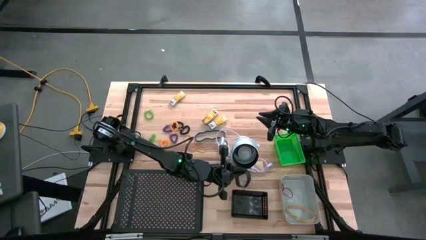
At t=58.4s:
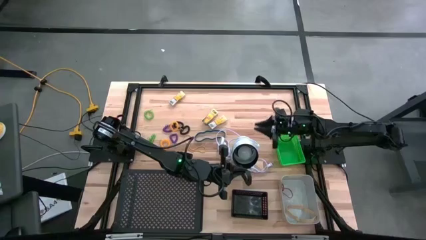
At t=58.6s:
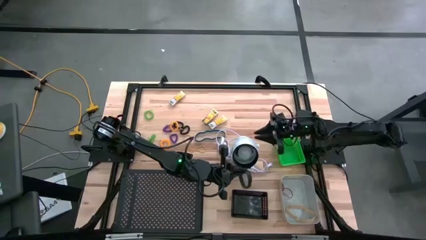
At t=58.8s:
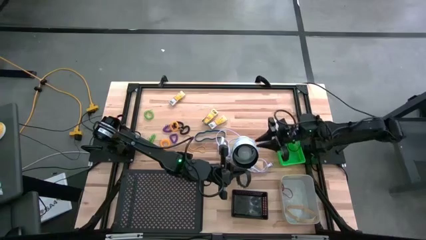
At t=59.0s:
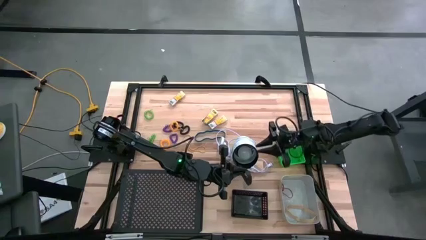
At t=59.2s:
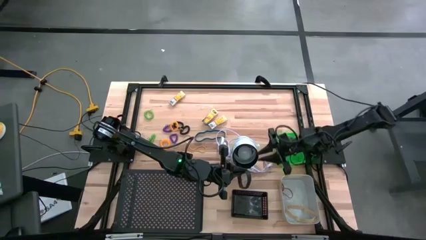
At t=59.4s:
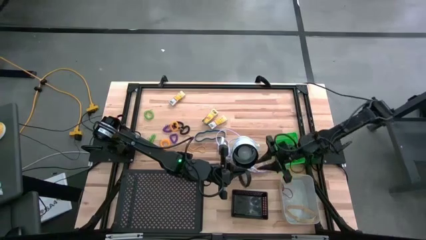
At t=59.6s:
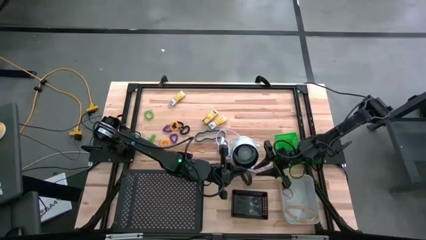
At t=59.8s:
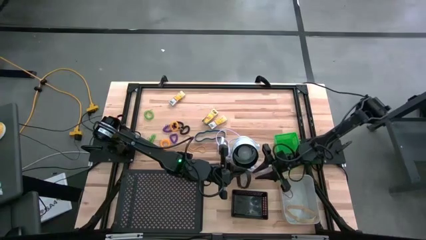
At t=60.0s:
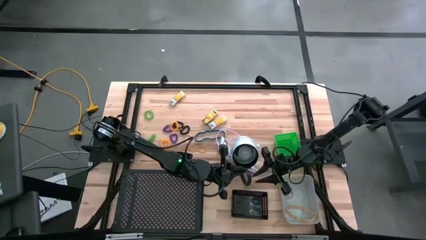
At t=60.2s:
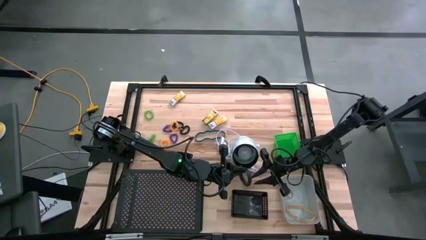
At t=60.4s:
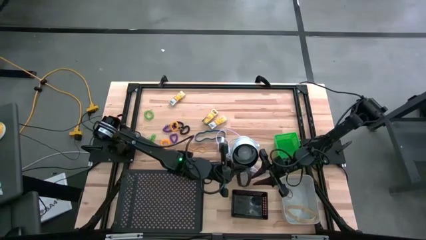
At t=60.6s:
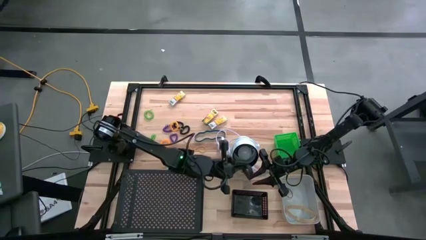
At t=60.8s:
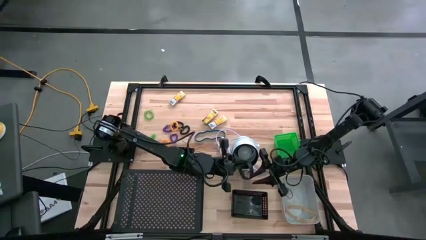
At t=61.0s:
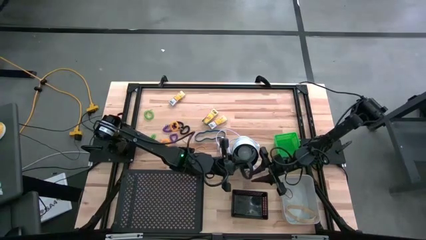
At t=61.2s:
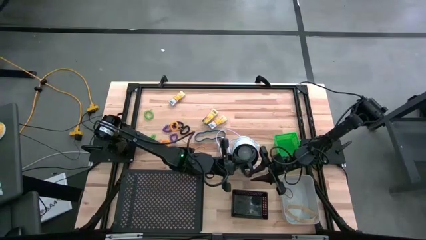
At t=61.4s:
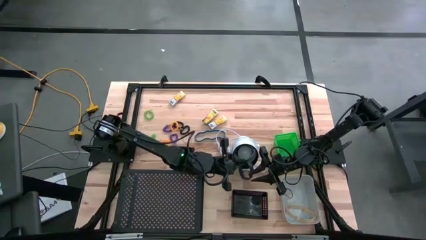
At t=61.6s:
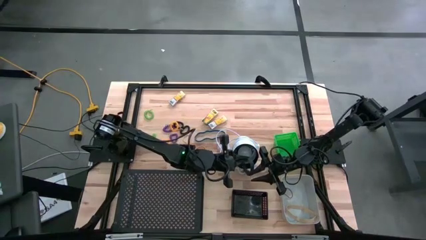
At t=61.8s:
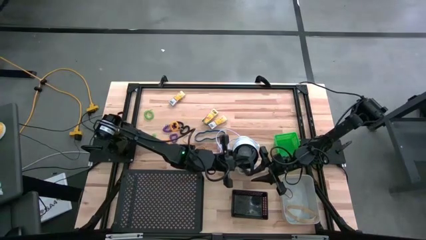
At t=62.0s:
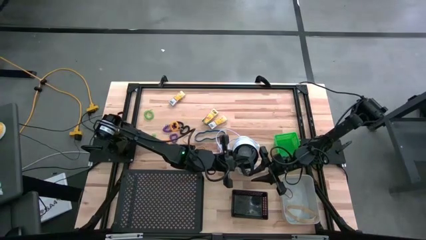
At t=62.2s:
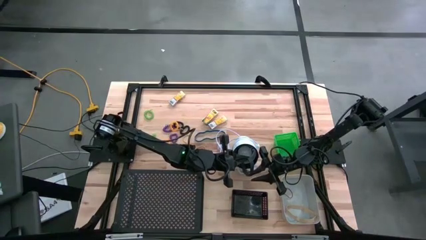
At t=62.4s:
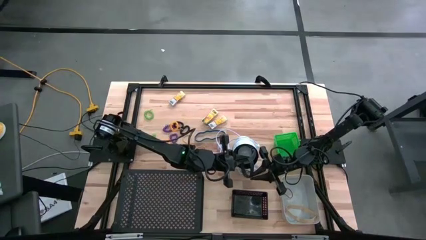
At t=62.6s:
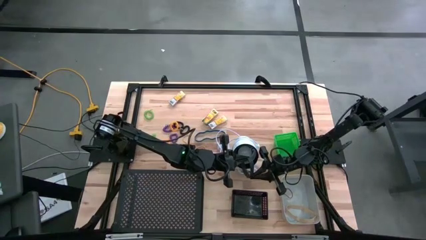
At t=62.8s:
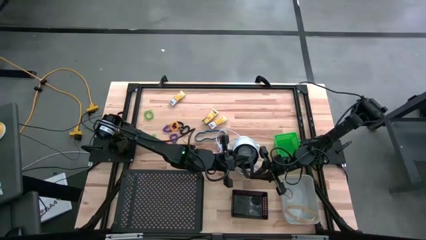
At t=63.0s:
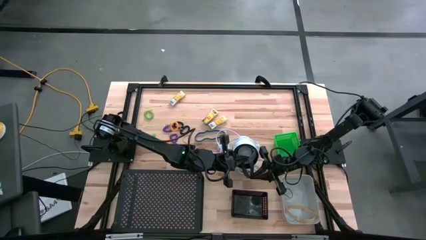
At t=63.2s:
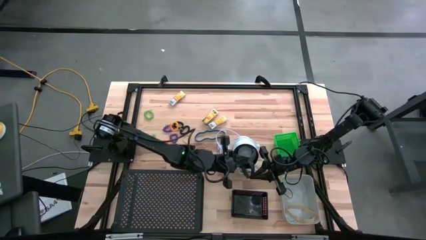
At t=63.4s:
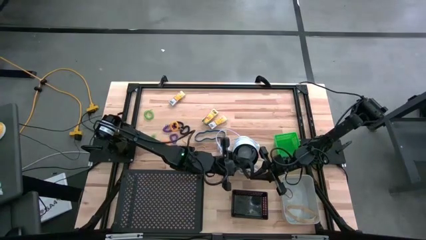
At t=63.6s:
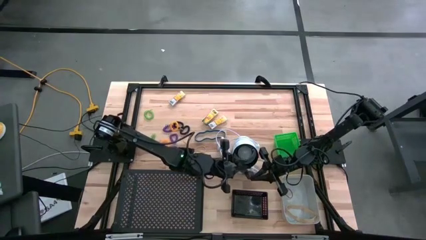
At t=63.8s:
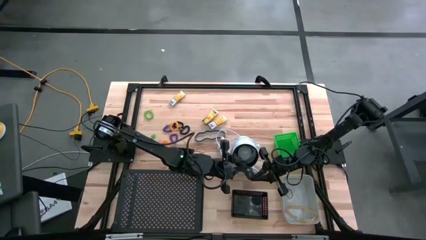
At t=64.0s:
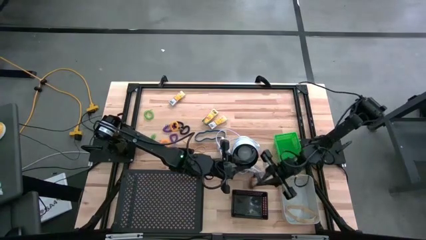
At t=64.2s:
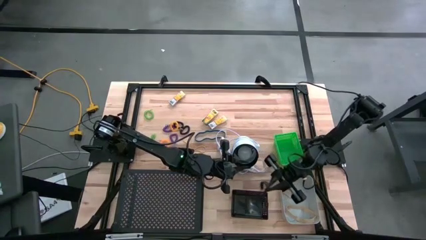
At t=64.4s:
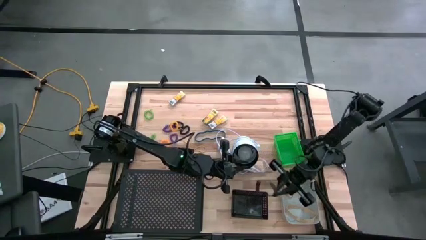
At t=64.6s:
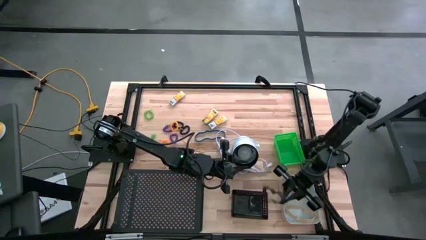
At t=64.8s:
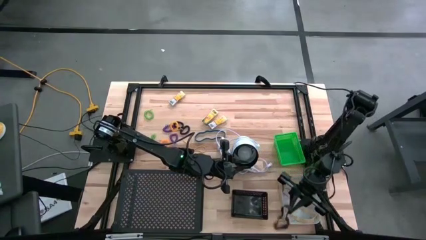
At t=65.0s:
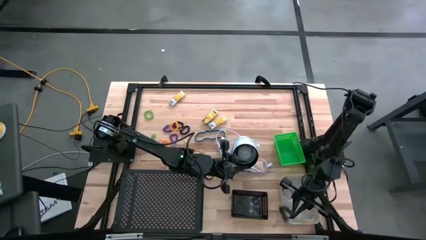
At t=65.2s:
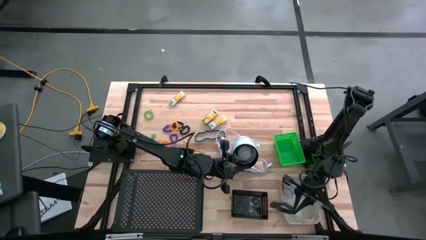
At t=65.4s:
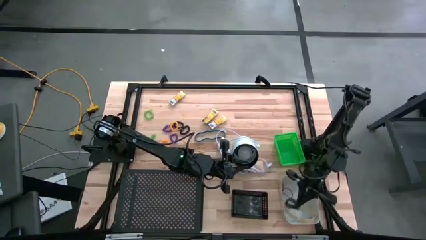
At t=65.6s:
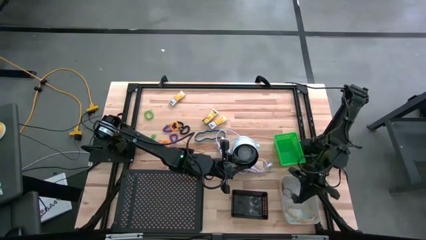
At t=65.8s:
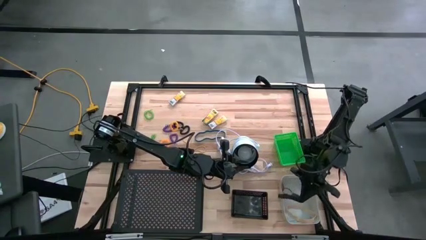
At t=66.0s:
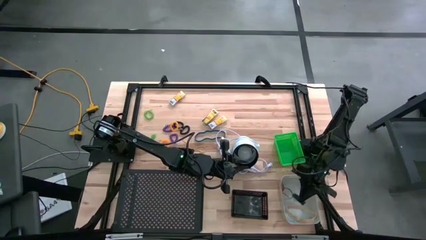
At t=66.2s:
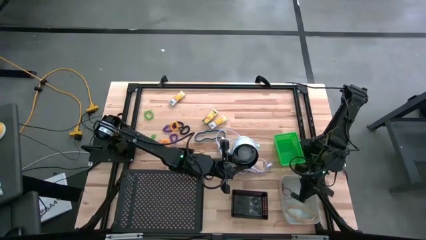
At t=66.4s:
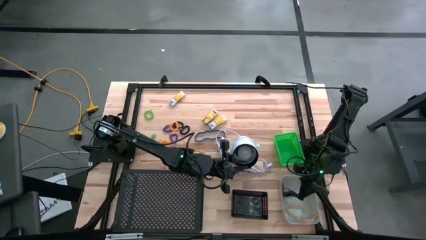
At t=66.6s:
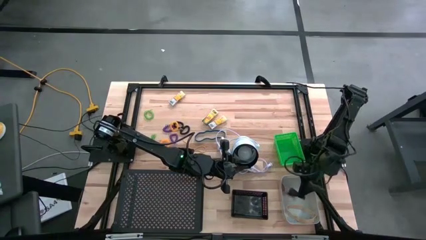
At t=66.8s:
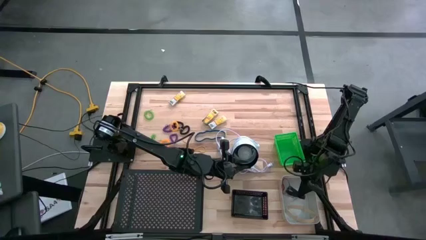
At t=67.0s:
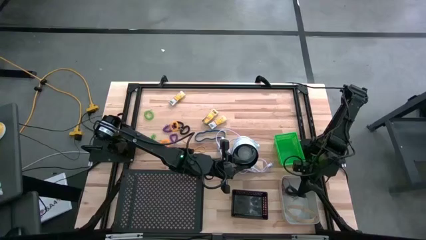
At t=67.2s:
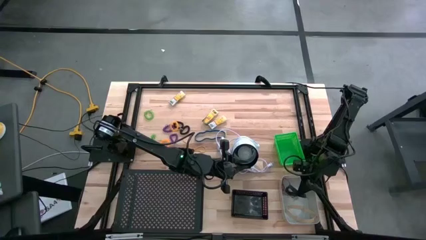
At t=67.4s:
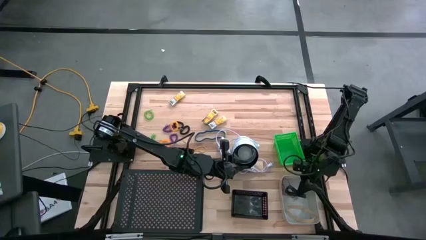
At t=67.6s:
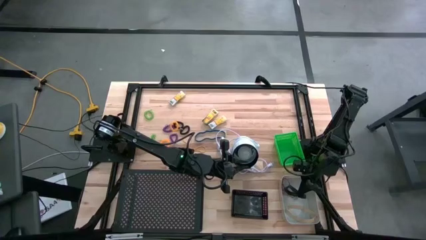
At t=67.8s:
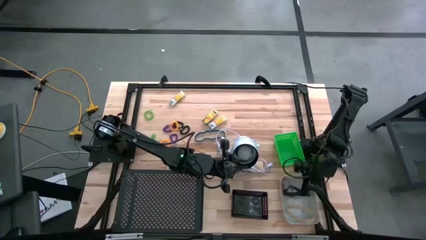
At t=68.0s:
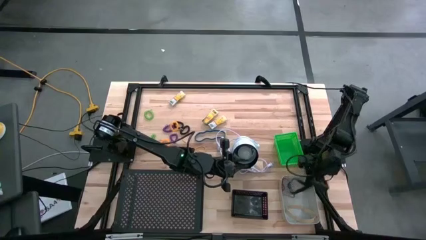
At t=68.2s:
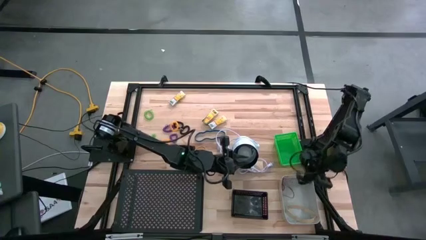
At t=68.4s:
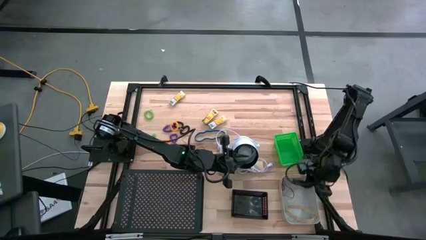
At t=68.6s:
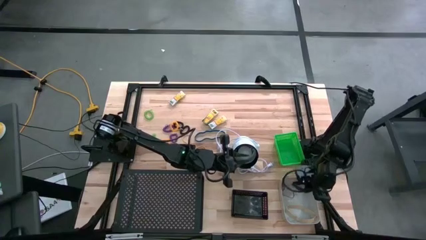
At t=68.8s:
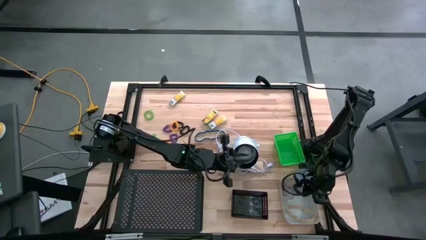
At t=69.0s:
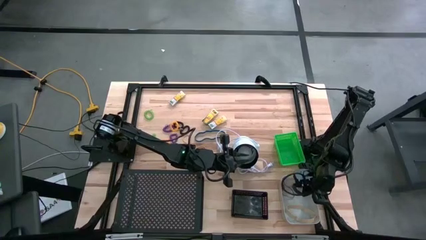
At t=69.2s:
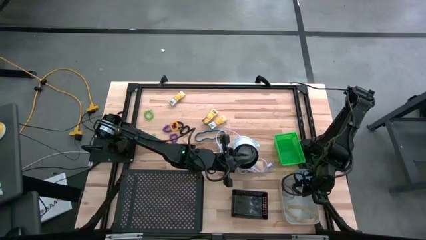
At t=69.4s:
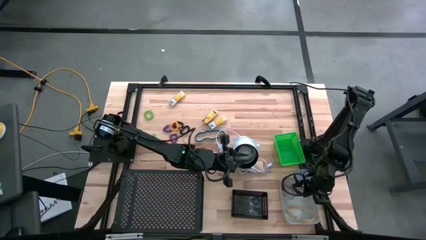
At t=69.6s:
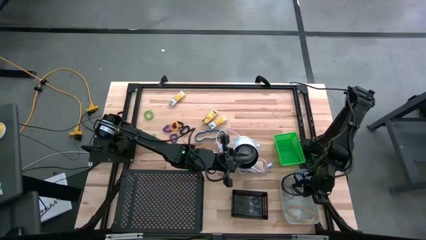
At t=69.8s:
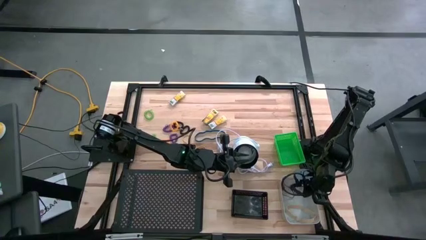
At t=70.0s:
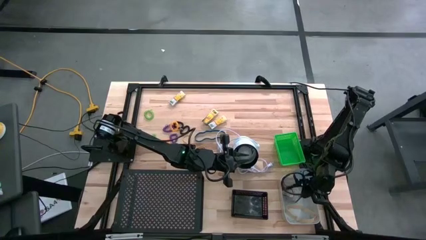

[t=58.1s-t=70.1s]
Task: Pick & Place Office Desk Supplies
Put the black rubberband into the gray bin

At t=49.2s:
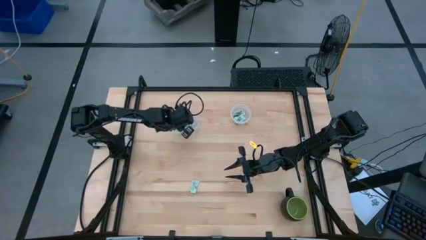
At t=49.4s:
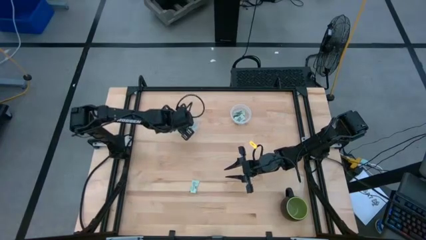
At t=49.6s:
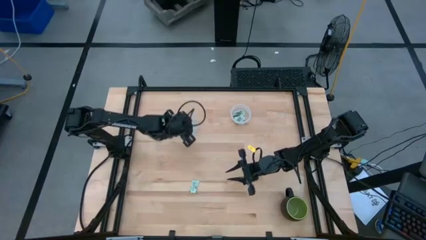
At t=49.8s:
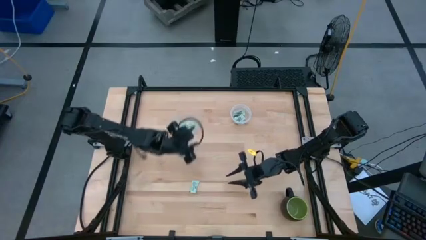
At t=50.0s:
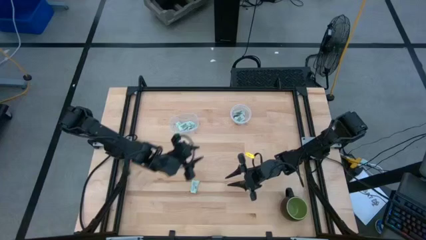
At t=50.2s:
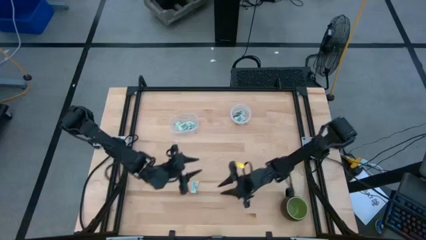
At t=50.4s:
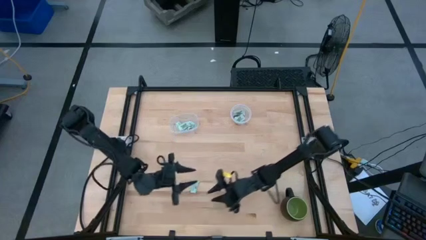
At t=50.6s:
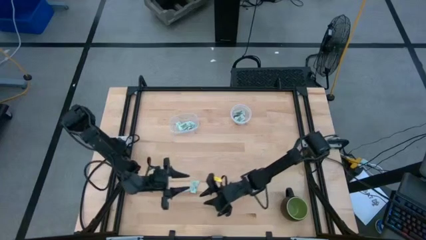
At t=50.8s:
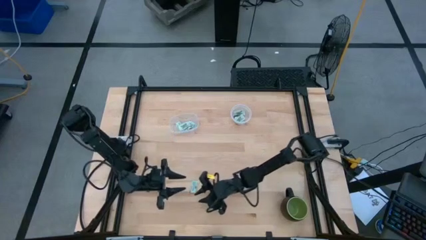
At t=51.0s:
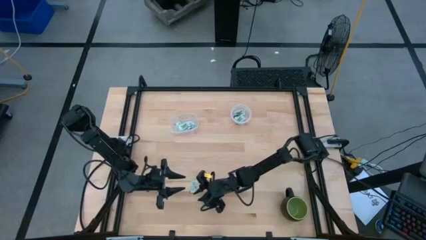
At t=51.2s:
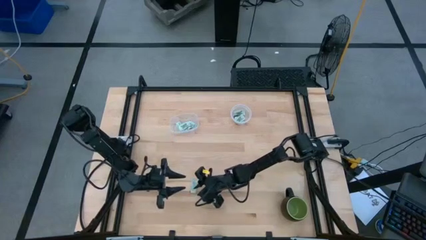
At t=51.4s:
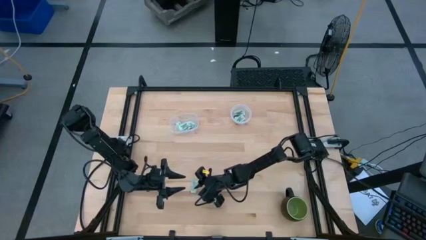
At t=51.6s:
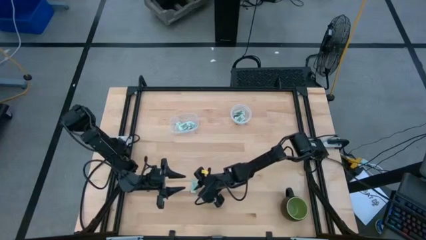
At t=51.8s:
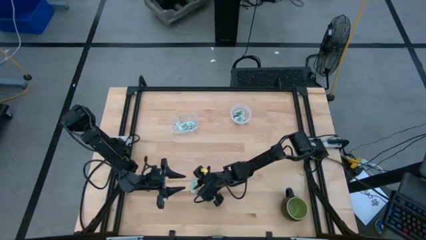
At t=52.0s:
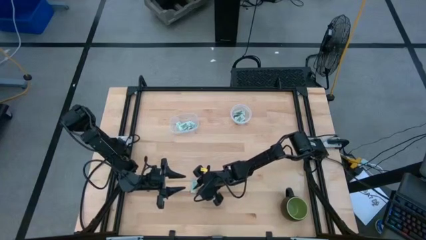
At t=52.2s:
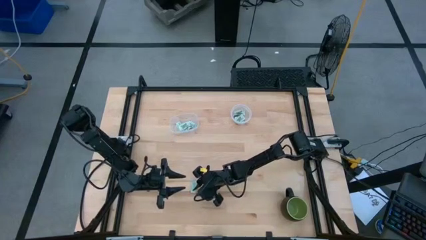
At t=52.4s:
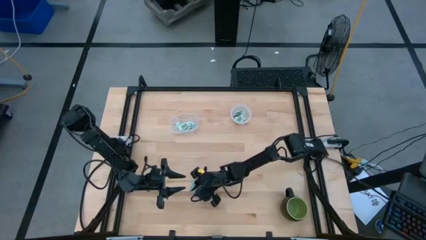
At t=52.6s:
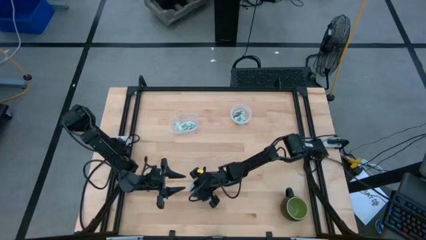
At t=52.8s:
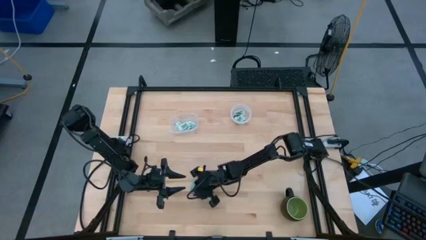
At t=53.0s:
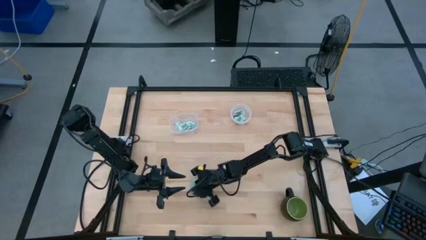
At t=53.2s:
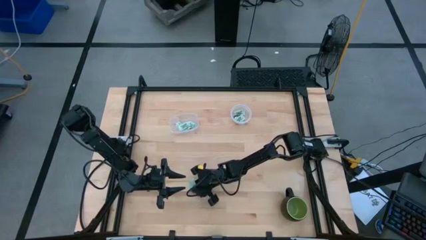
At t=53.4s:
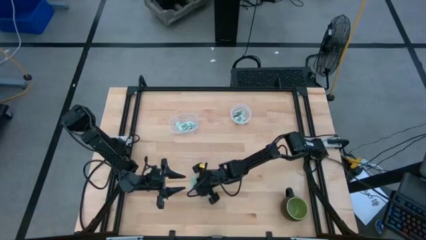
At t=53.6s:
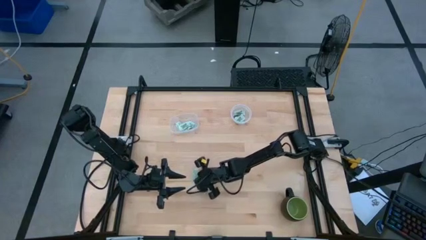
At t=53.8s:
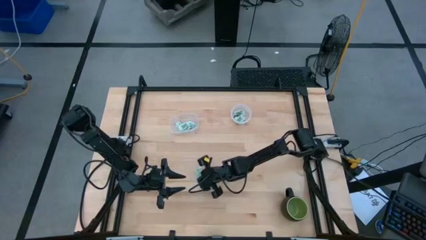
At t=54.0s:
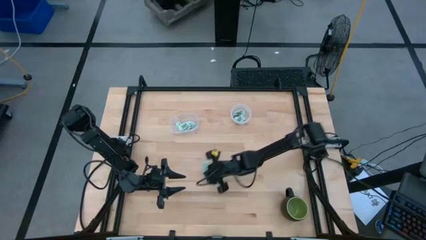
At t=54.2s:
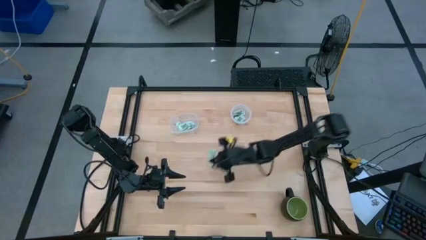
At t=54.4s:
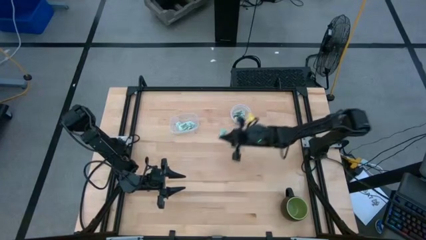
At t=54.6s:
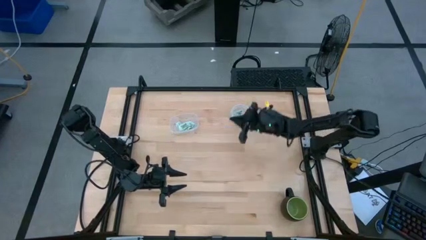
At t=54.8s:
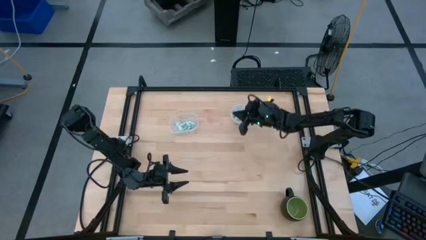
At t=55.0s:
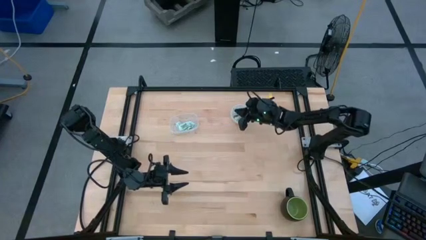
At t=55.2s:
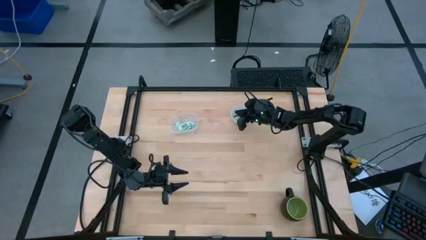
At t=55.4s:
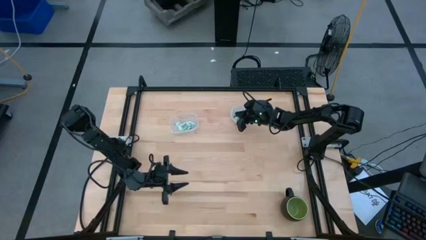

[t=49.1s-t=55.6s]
Task: Pick and place Stevia / Truvia into bins
Put the stevia packet into the right transparent container
